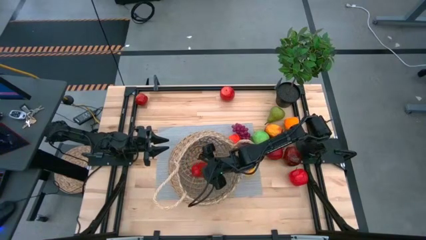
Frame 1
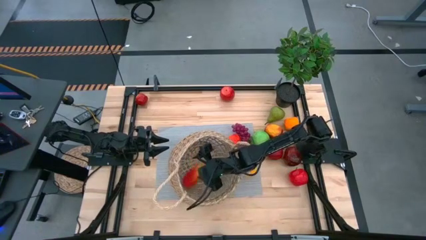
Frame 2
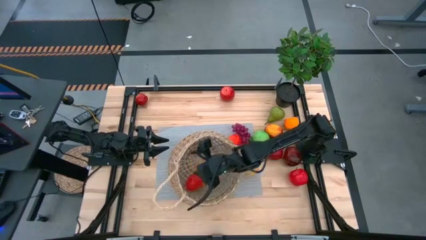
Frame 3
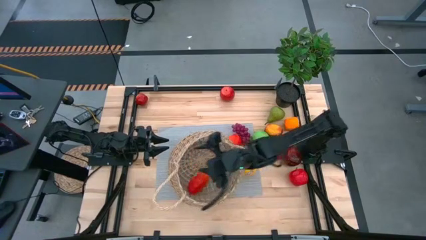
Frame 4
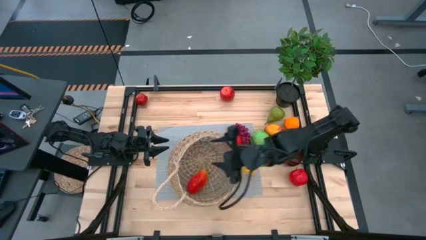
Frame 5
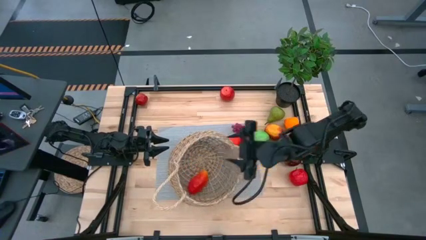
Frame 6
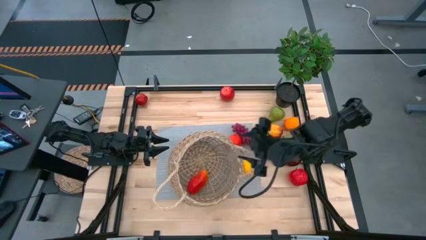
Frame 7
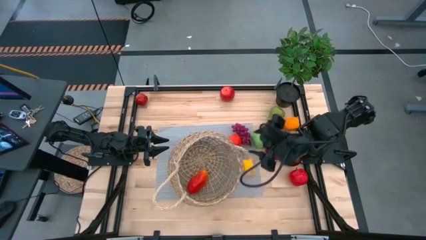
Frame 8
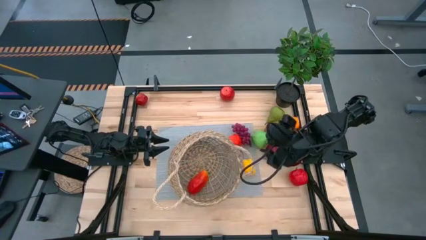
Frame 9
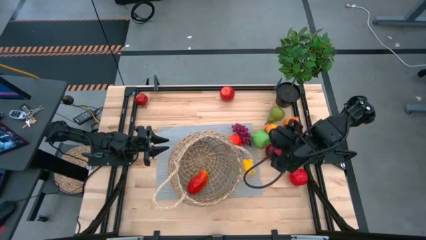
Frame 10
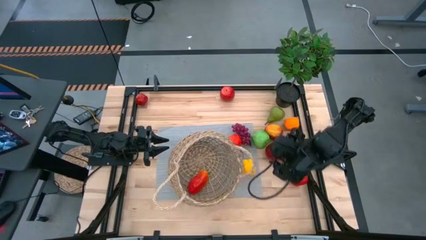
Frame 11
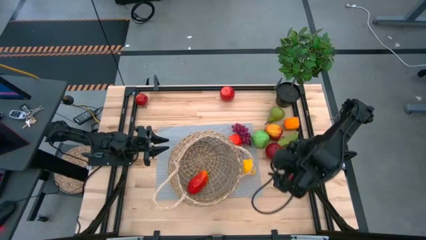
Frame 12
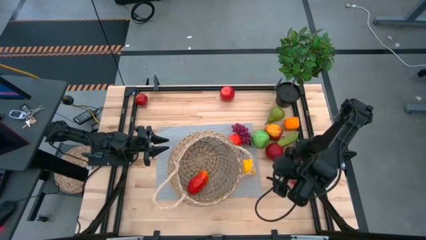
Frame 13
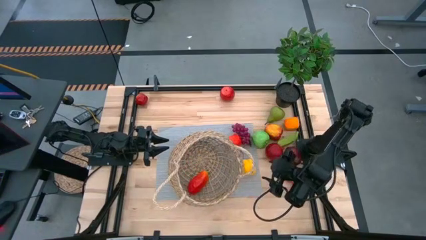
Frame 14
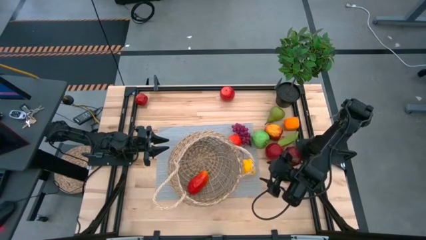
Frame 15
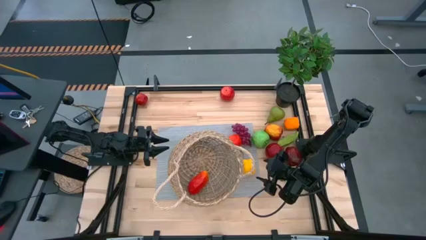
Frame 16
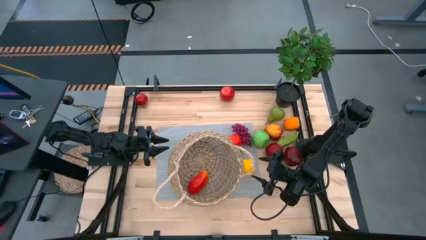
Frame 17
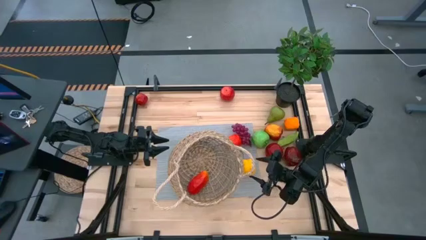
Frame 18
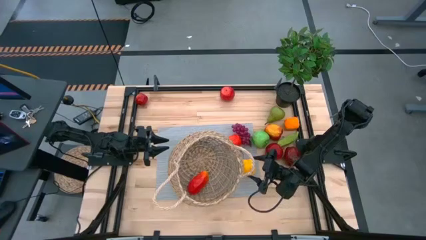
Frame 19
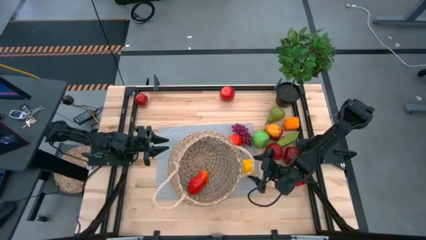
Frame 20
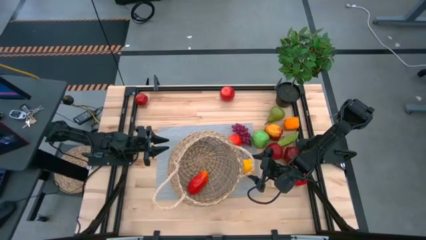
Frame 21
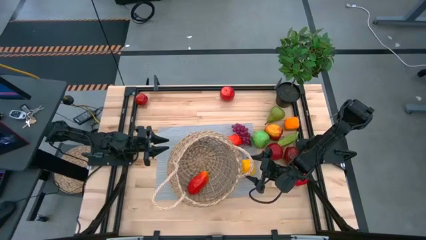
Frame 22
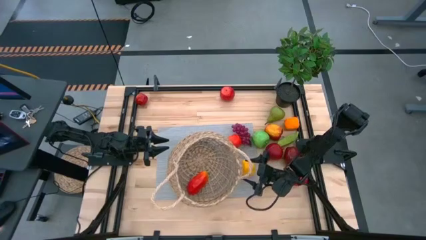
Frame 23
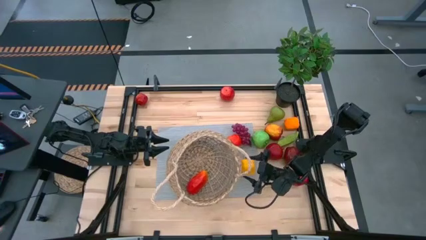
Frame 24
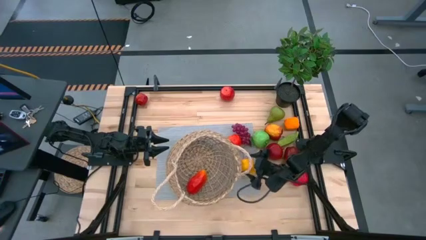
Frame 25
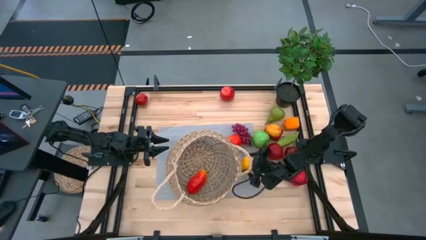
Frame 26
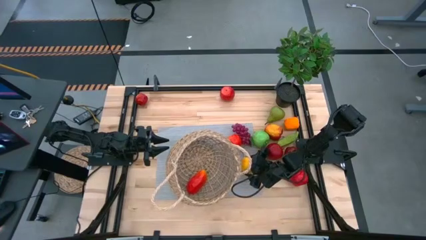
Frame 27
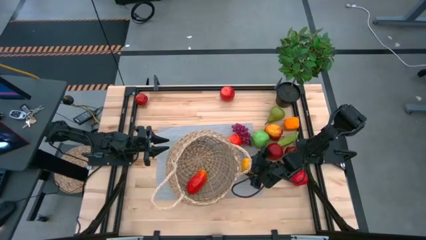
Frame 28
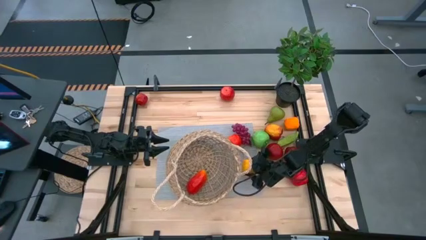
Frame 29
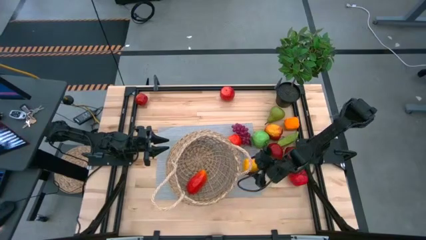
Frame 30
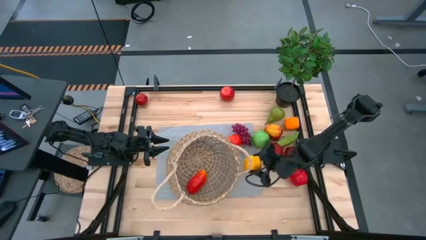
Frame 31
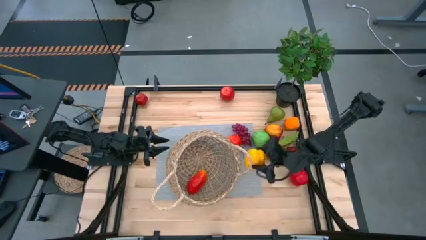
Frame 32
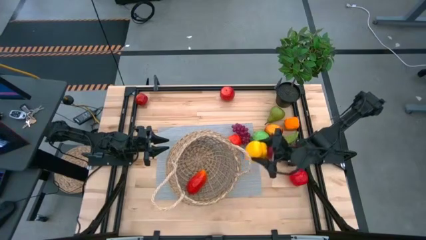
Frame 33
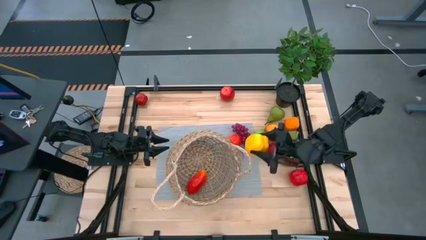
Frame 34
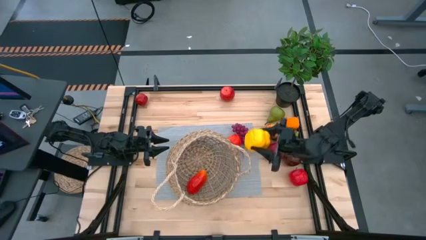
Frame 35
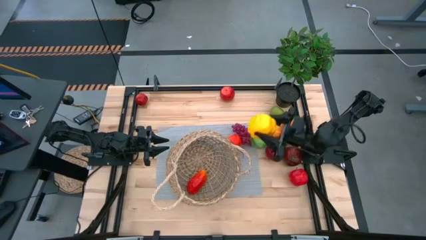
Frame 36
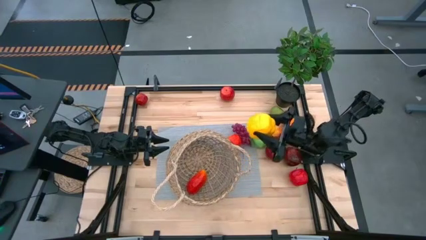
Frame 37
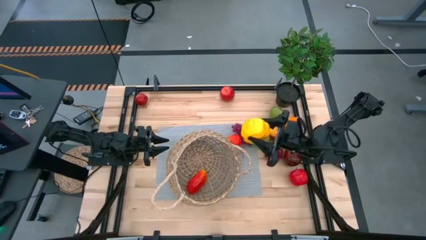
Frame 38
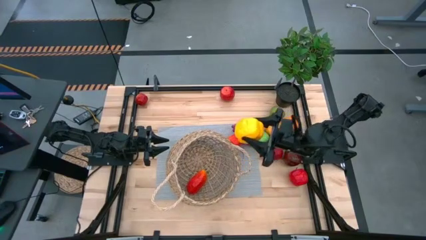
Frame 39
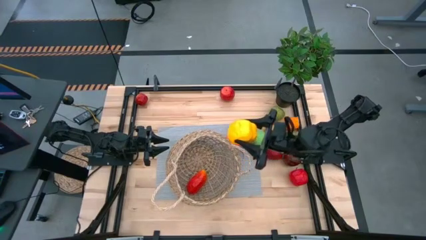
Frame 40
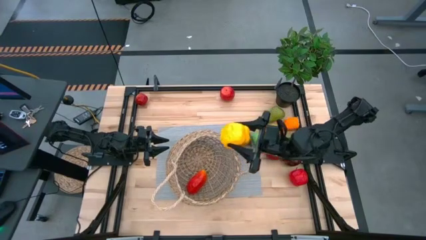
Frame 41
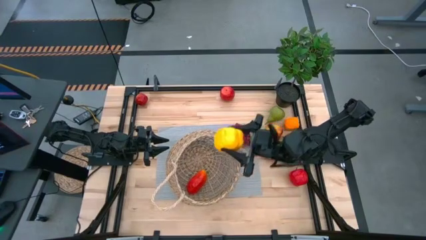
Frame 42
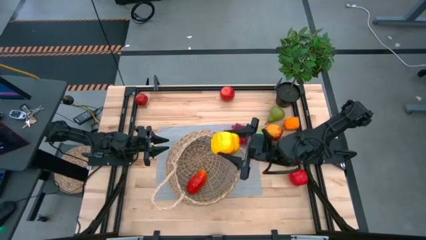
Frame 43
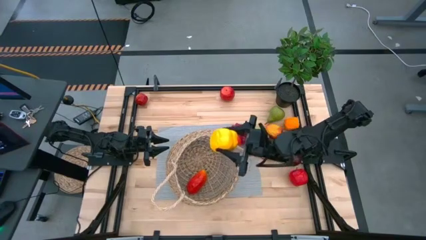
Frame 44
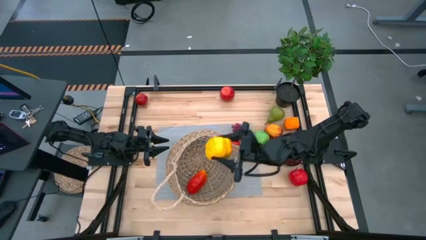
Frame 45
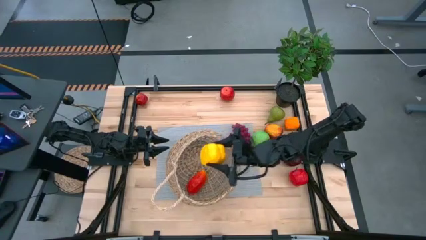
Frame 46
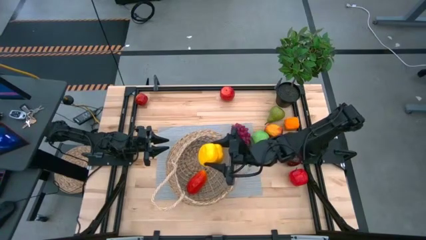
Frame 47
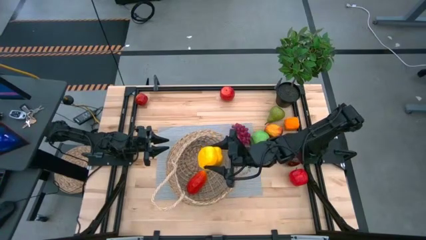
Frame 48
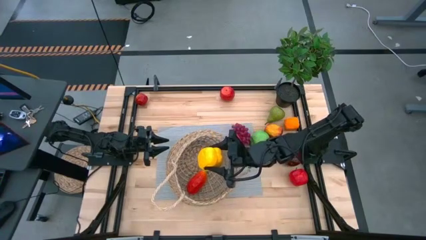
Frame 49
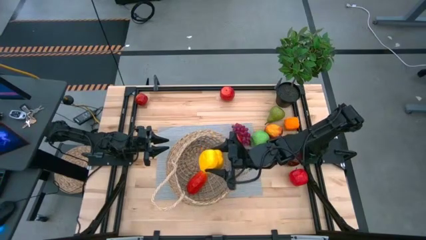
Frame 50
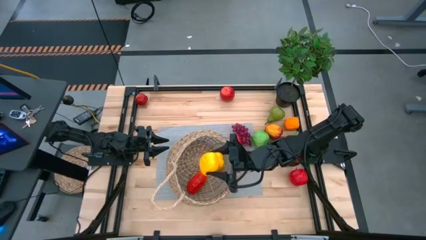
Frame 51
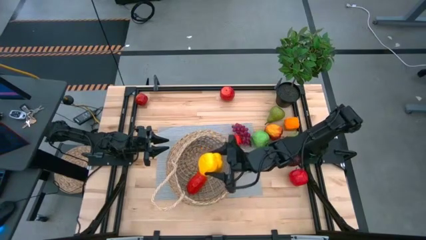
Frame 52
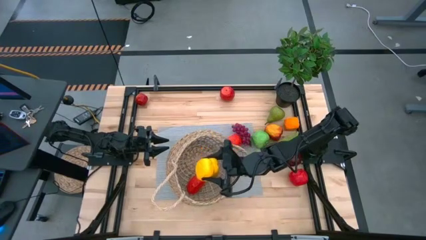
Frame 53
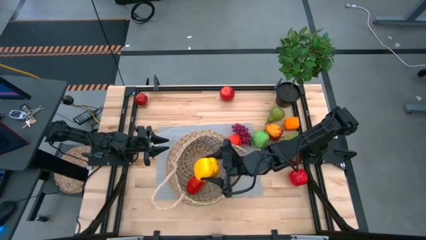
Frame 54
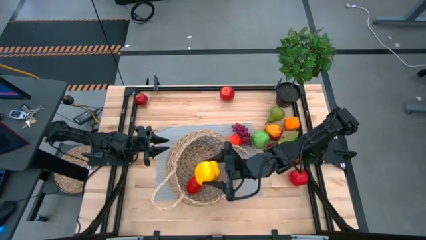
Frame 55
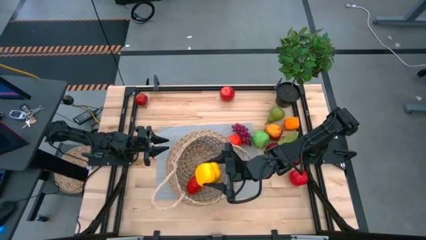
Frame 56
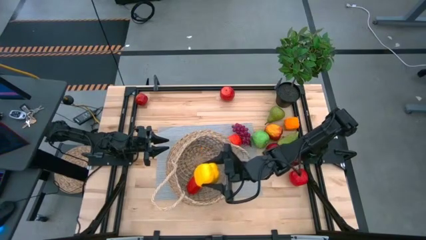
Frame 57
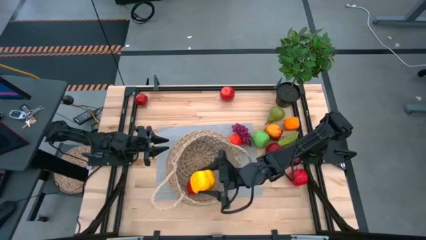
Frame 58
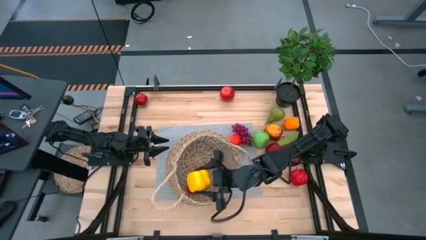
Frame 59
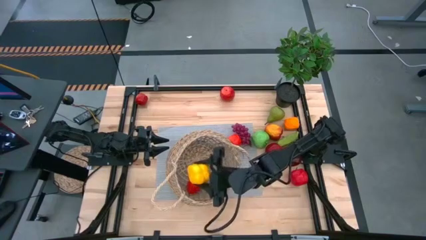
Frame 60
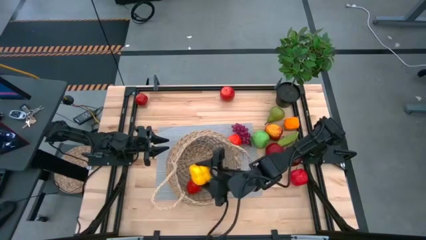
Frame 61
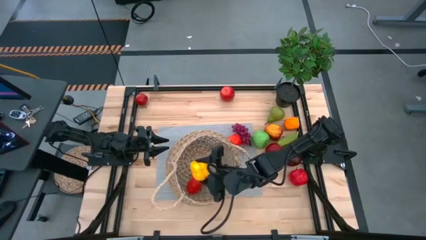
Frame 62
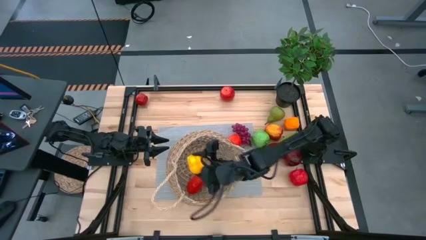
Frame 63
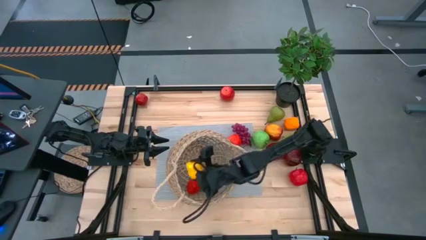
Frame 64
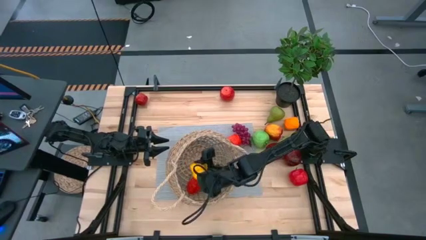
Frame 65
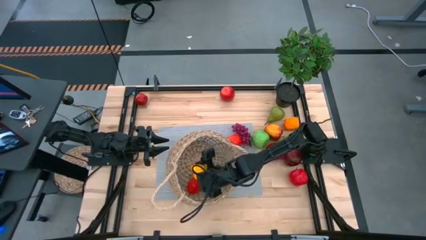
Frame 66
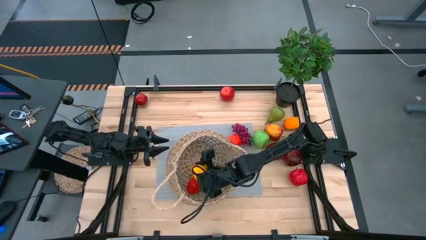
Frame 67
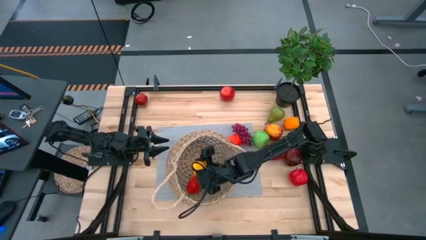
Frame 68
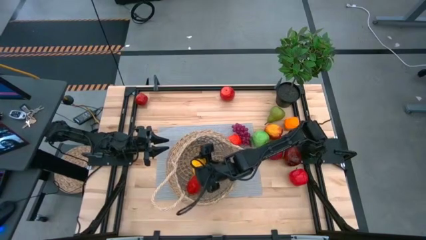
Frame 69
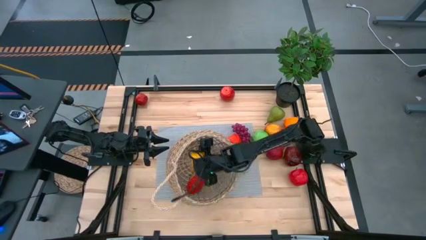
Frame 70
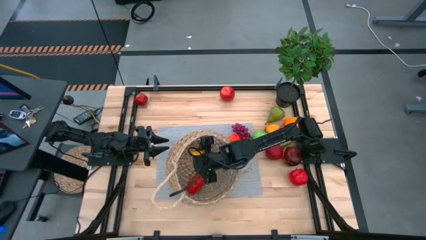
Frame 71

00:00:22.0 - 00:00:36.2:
Task: Build produce basket
Put the yellow bell pepper into the brown basket

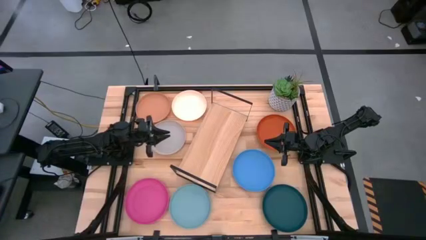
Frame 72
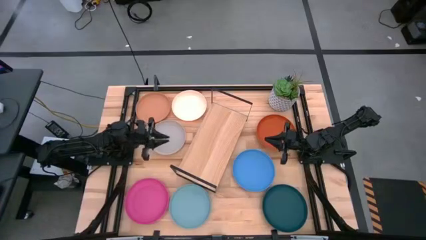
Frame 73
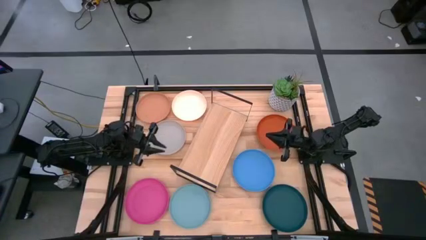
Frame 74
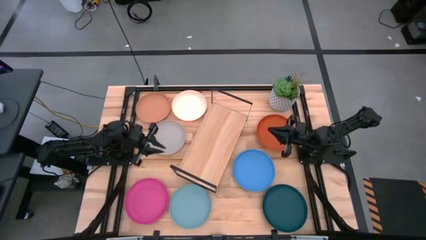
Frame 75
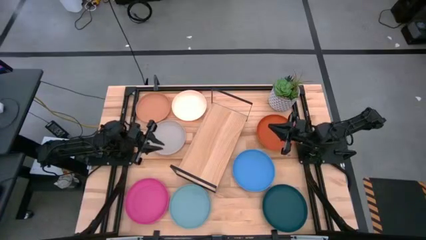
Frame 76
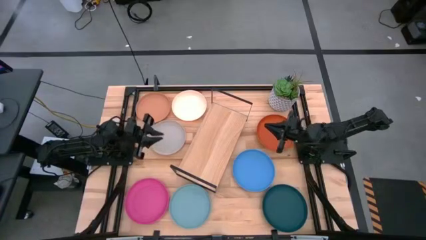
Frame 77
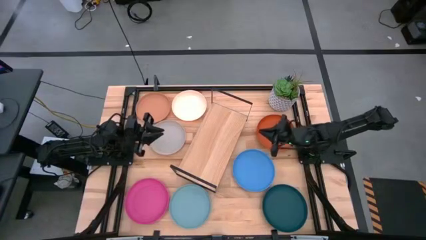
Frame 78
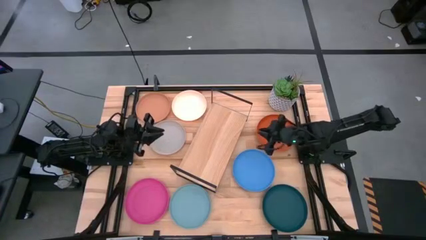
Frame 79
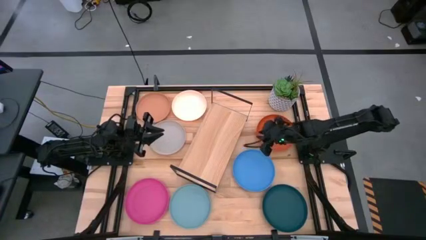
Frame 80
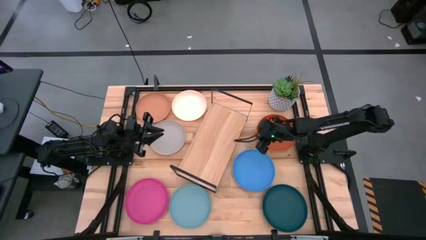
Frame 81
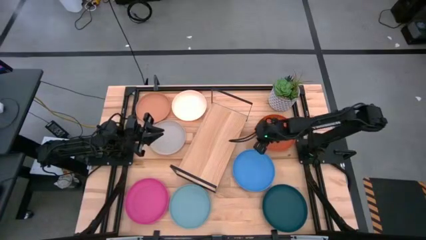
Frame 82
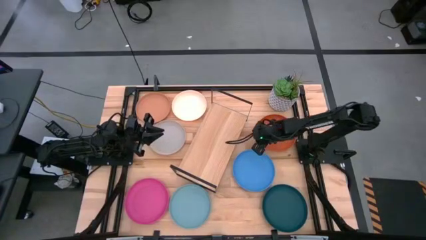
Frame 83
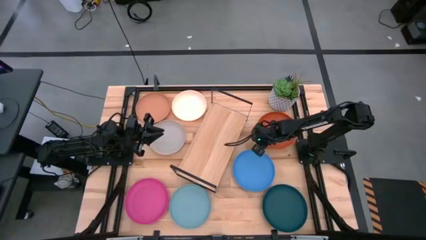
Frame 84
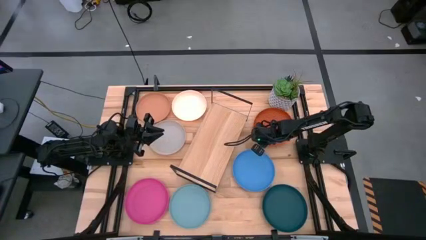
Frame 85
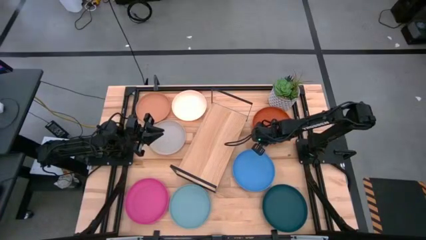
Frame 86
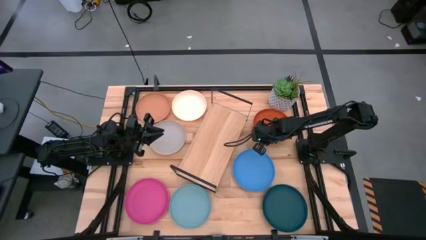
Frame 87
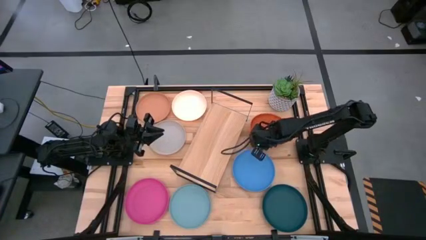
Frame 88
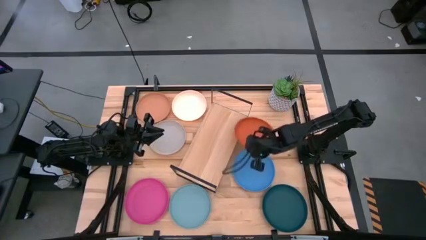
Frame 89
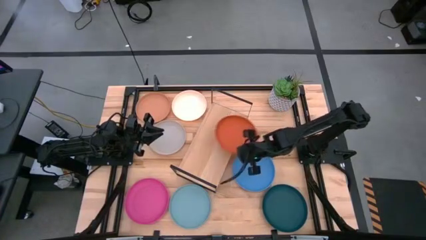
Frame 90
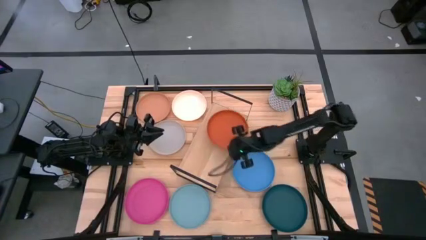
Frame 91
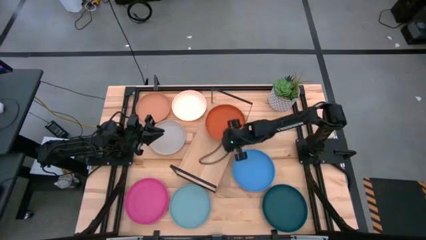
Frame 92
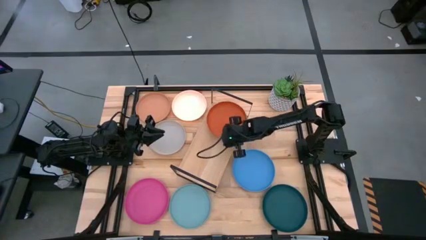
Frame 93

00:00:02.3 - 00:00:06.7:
Task: Place and stack plates onto a shelf
Put the orange plate on the shelf
